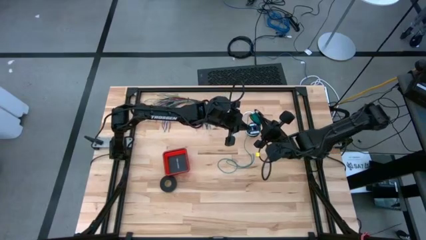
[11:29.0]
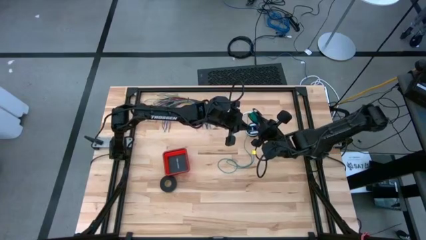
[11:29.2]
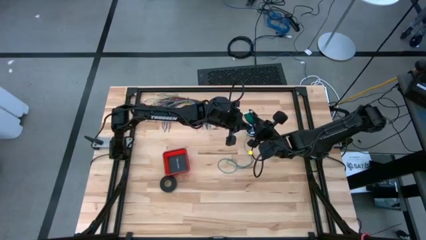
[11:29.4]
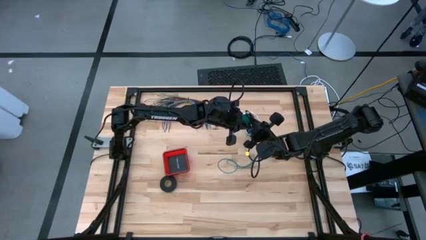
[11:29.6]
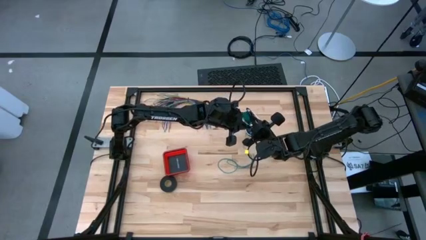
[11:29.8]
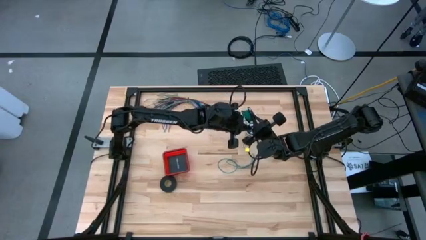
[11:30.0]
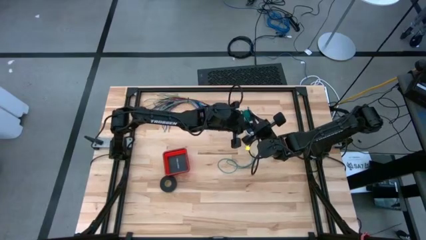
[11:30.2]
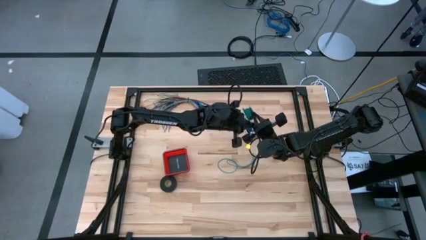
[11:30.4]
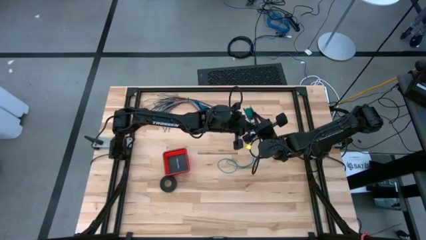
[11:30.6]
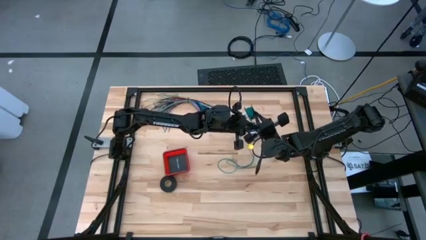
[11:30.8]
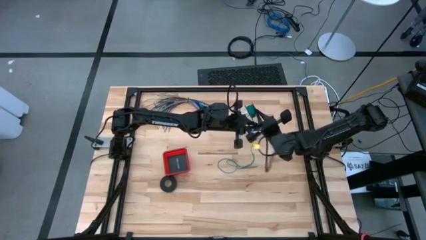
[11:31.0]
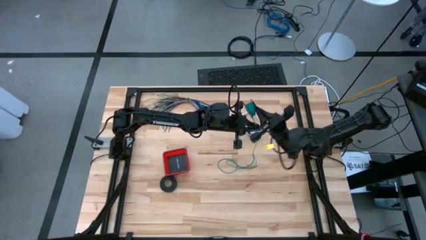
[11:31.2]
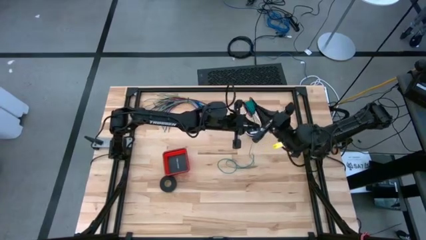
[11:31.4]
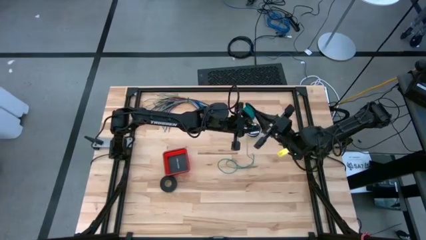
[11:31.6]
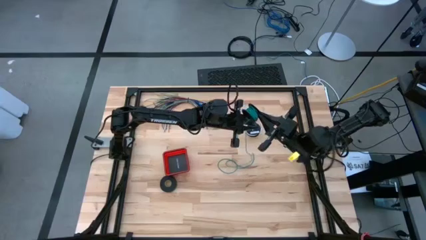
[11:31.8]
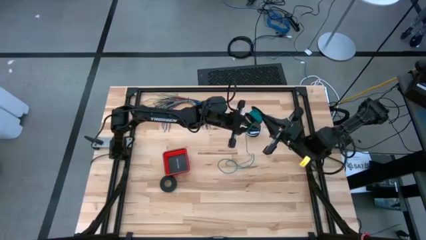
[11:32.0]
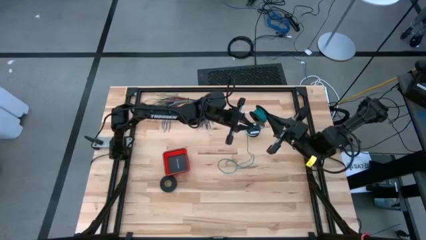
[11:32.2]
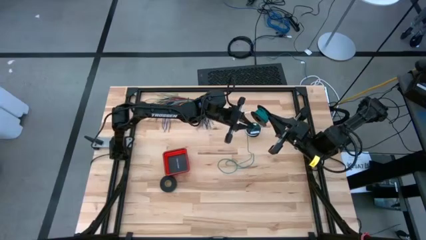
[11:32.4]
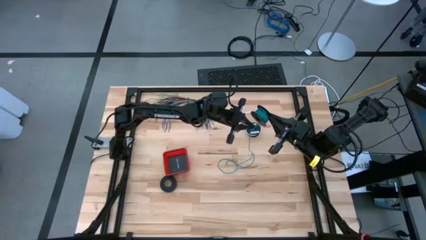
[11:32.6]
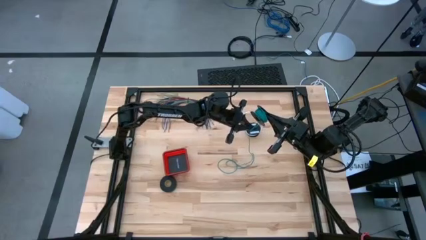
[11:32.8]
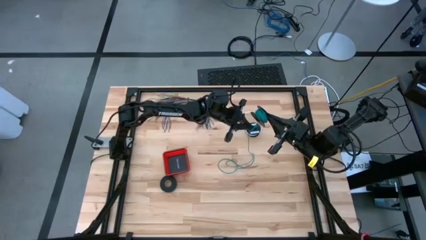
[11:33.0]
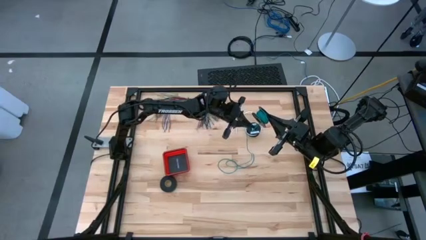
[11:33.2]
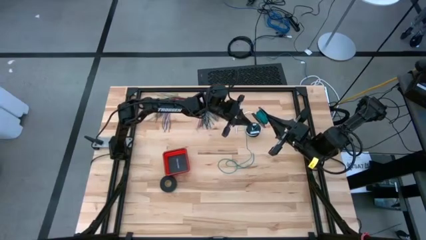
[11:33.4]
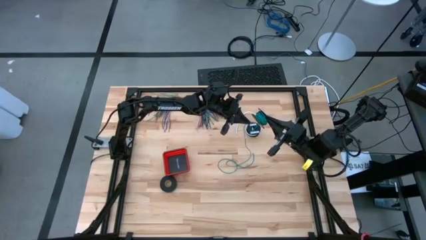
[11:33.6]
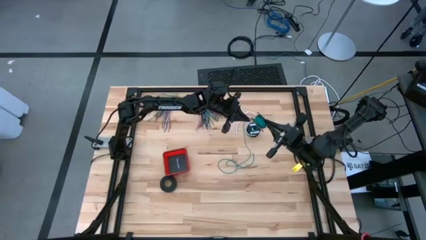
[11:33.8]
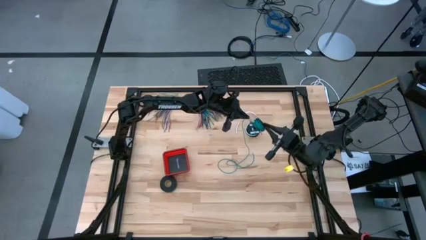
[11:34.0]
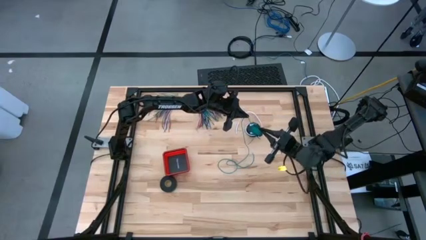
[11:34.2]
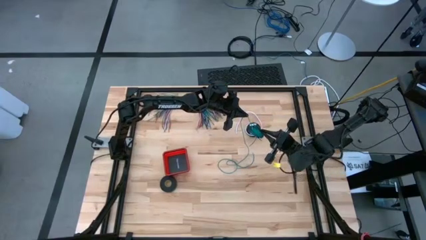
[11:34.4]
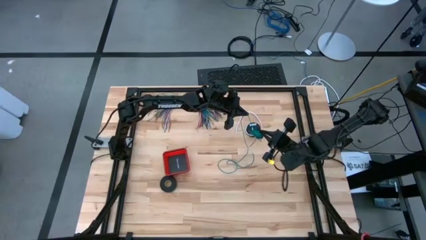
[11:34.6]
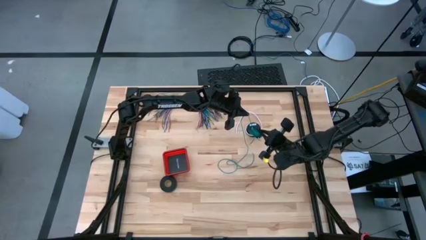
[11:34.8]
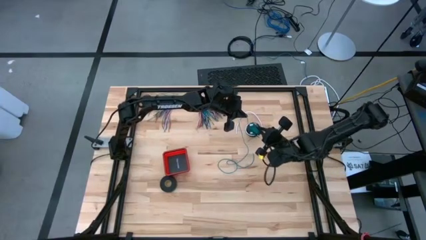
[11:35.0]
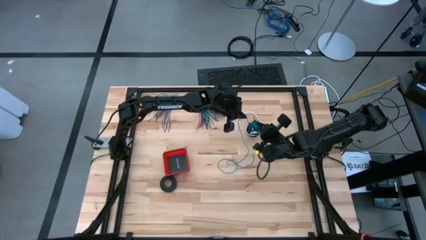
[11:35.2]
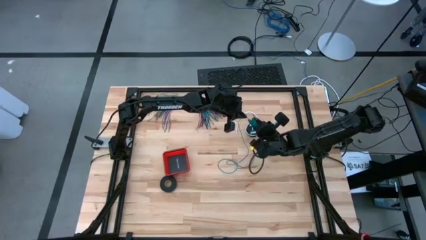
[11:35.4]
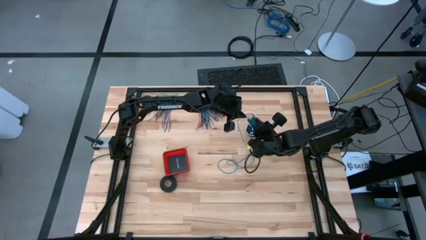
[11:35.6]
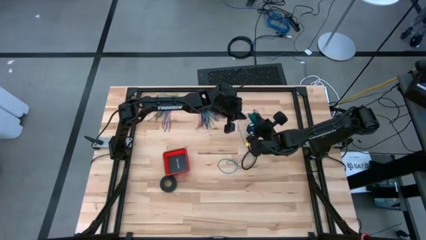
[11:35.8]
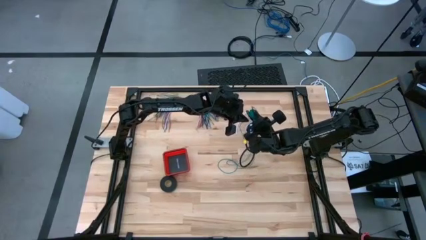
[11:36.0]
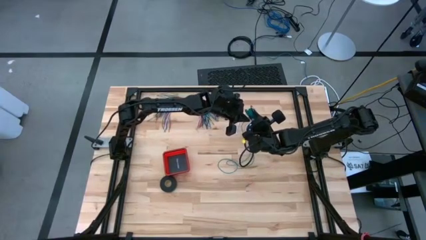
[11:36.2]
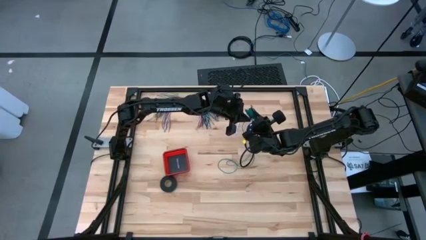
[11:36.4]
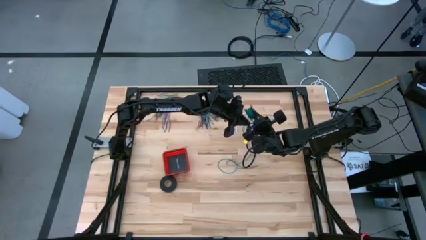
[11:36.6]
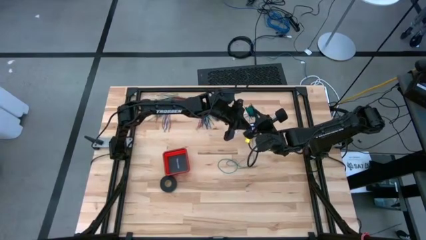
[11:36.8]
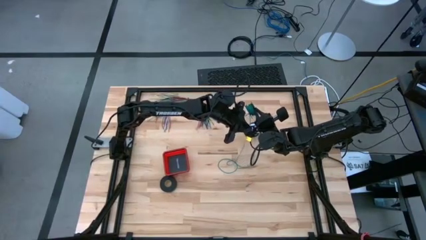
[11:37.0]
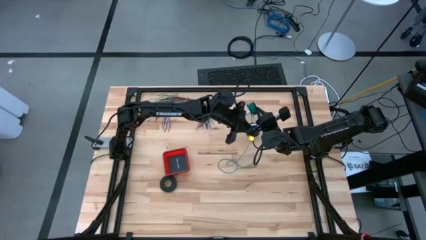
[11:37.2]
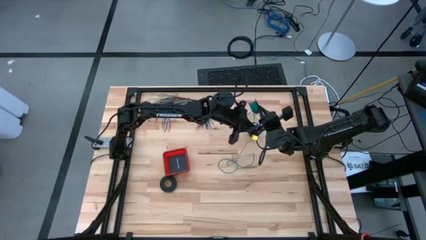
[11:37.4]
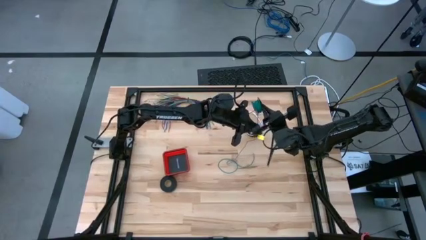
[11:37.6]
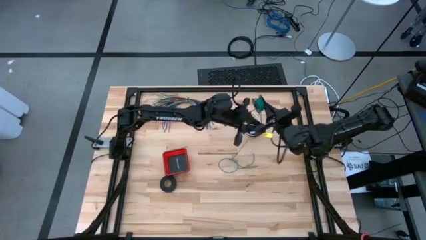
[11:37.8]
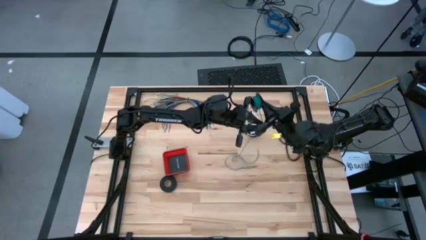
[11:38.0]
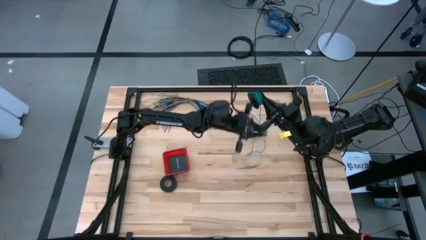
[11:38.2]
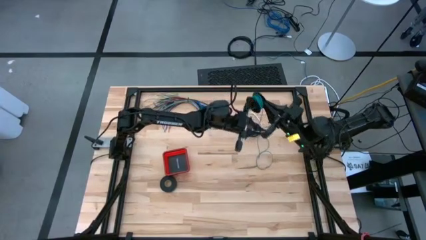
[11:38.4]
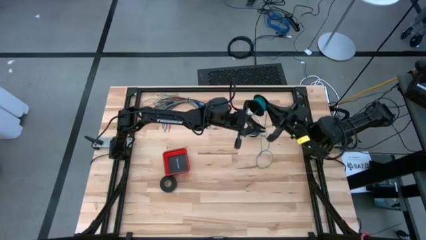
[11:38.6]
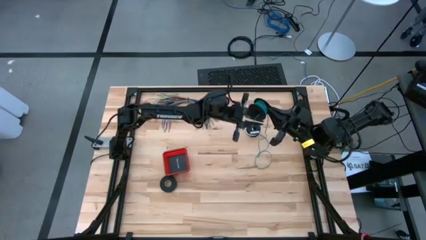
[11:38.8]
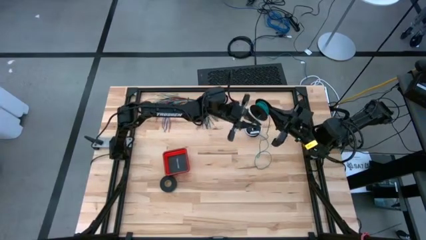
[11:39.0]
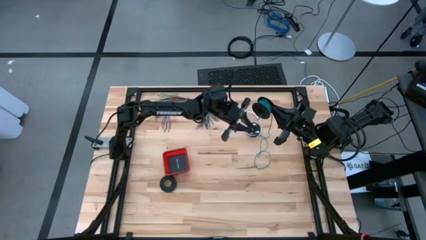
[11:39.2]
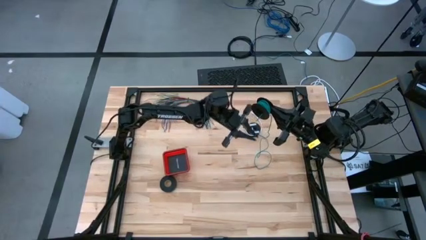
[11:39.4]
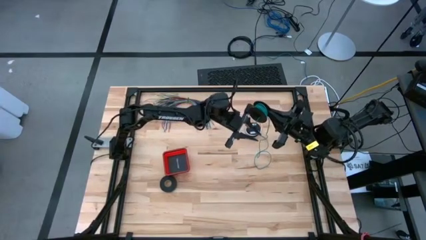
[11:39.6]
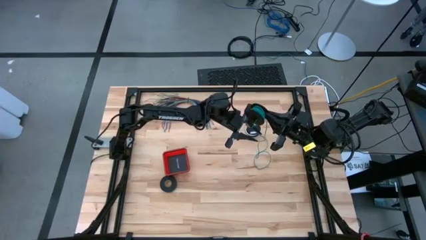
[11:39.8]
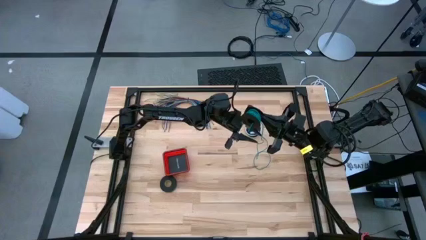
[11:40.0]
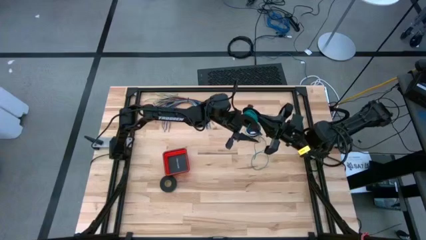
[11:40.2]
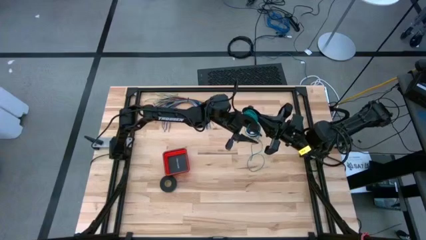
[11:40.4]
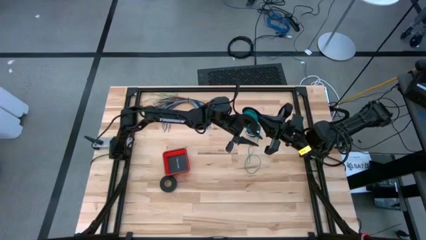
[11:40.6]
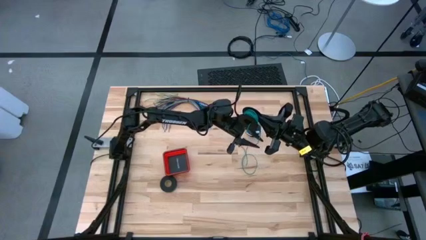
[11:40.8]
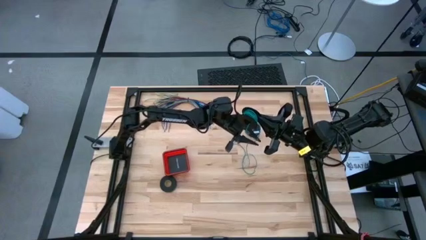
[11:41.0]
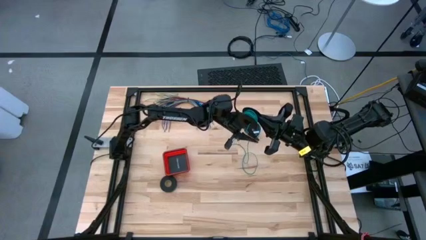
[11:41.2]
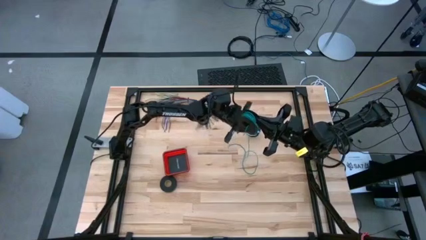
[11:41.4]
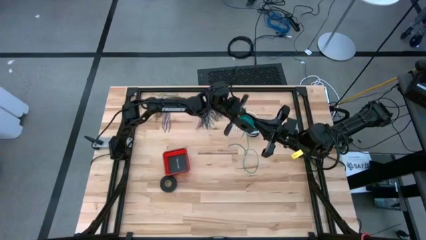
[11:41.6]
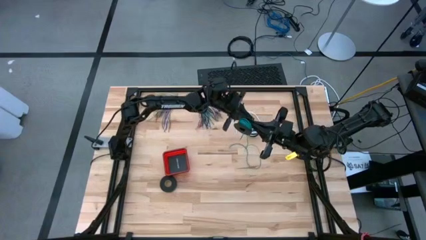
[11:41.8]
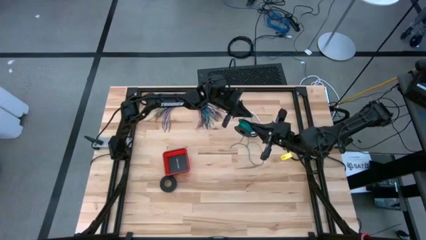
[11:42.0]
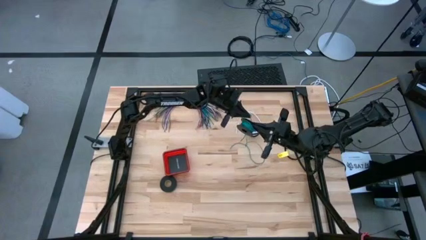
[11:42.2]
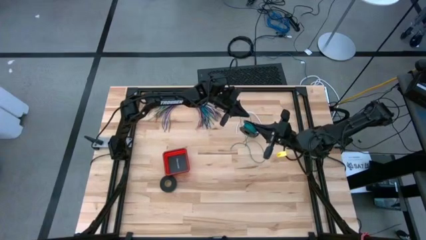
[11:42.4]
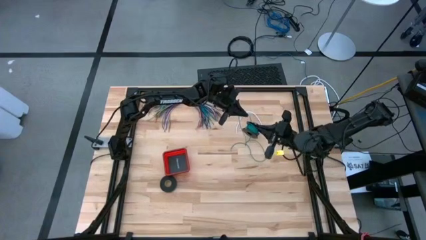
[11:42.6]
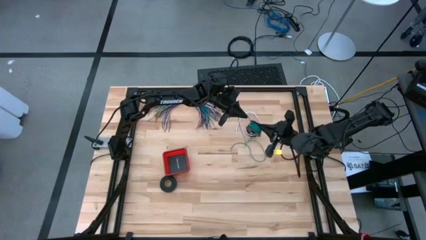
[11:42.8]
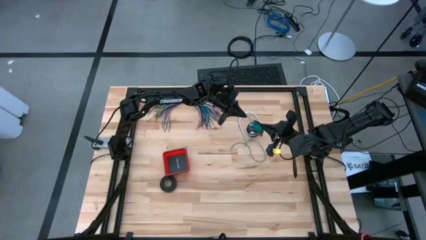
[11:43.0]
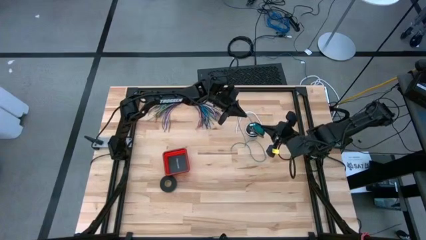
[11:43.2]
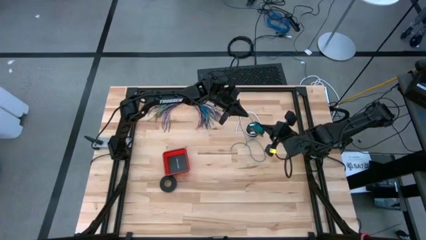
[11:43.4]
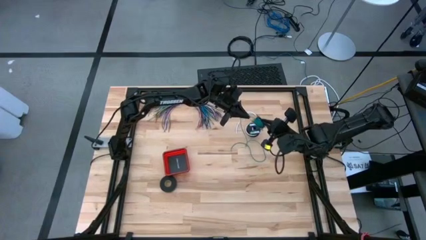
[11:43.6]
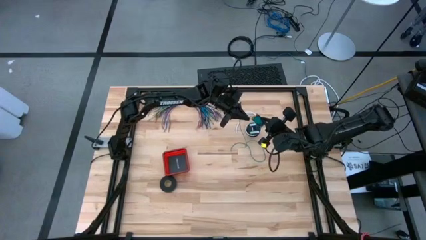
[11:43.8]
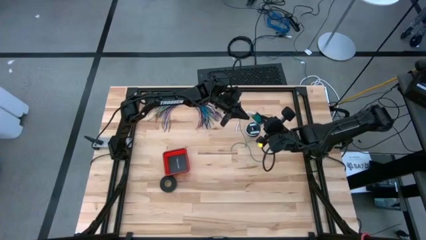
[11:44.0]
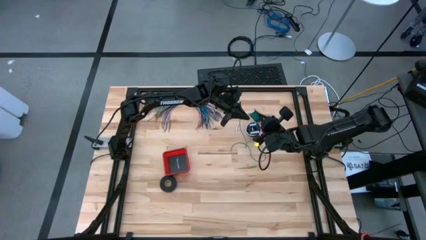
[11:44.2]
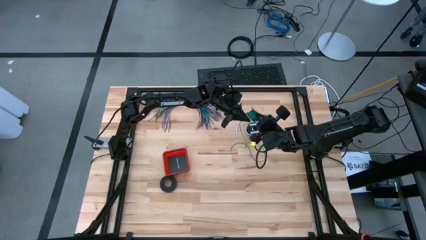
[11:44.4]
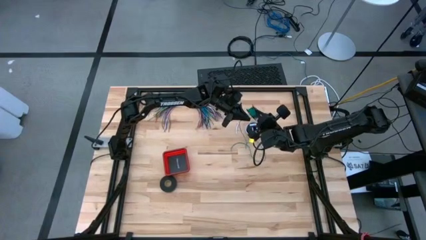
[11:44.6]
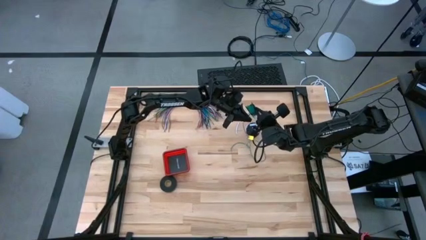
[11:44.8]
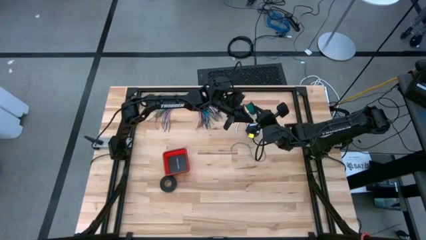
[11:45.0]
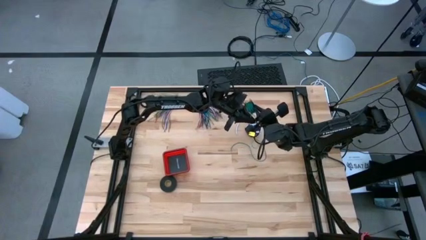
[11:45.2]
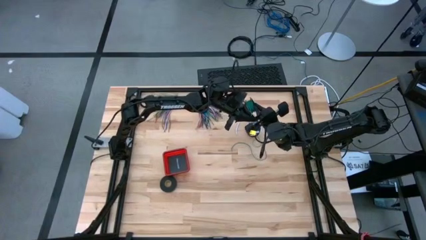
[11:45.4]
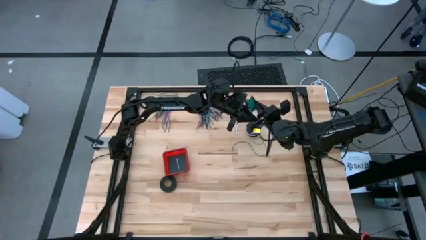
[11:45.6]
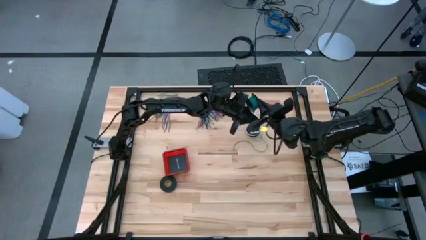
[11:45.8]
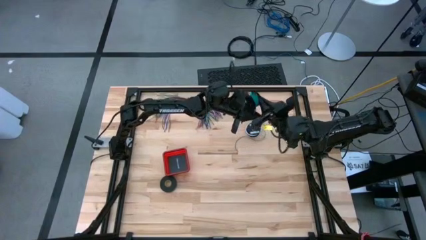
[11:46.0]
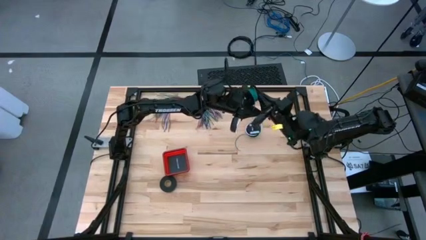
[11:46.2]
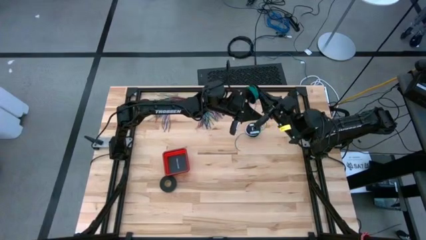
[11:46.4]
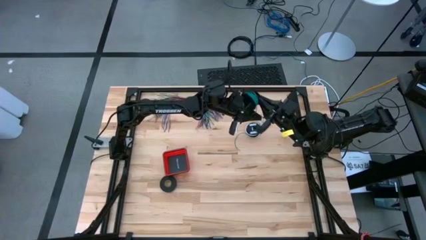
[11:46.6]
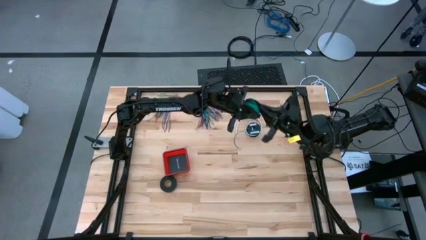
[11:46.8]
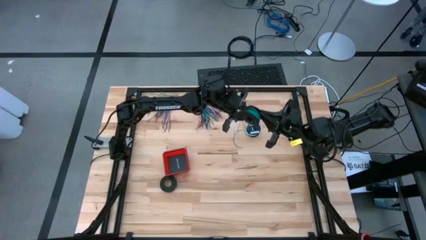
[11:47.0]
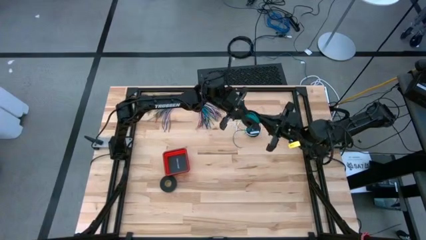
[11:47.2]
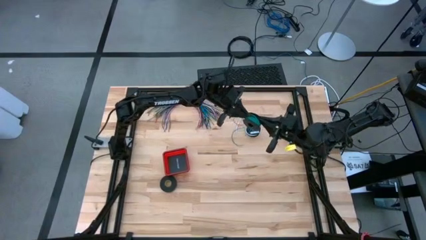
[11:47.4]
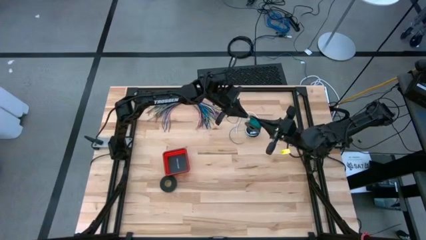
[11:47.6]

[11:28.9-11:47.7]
Task: Coil cords
Coil the green wire onto the spool
